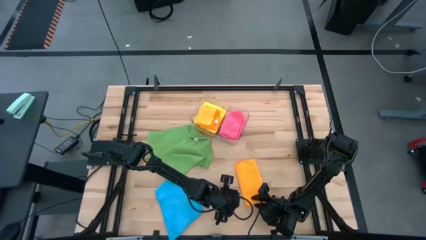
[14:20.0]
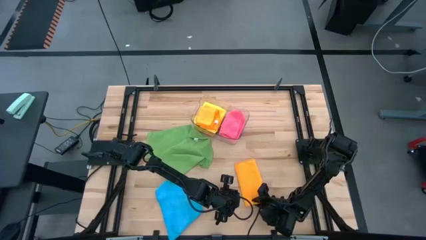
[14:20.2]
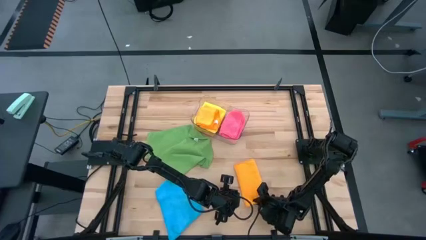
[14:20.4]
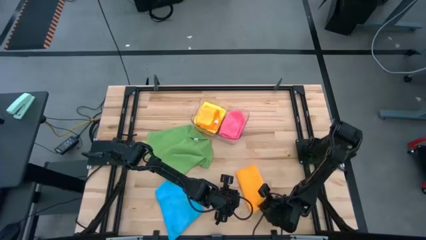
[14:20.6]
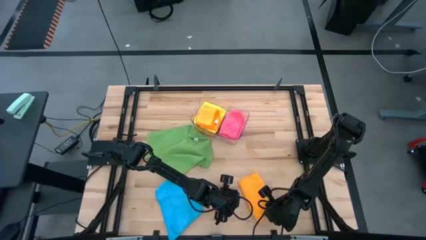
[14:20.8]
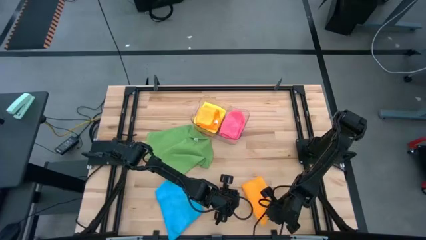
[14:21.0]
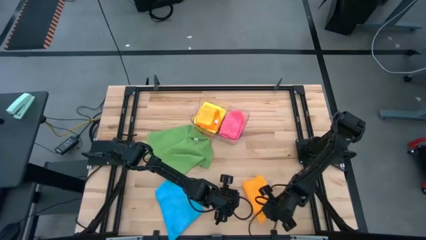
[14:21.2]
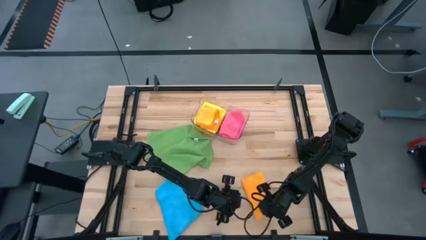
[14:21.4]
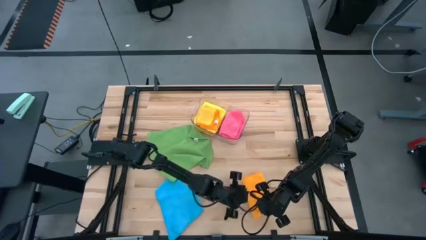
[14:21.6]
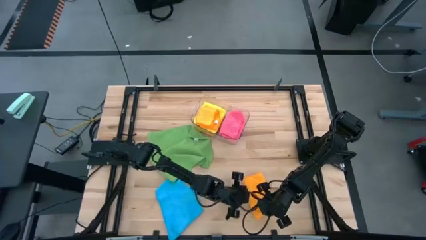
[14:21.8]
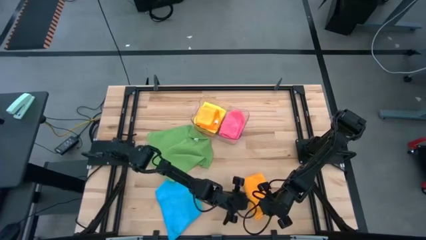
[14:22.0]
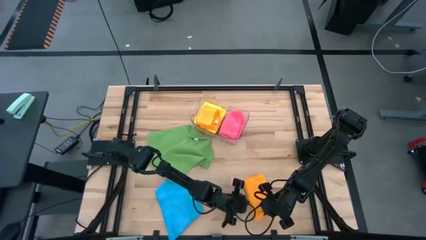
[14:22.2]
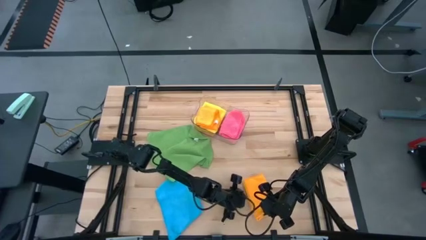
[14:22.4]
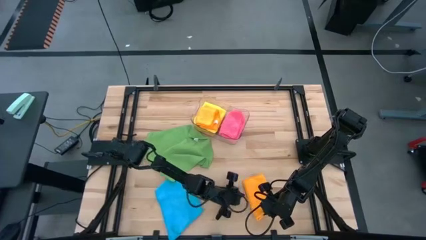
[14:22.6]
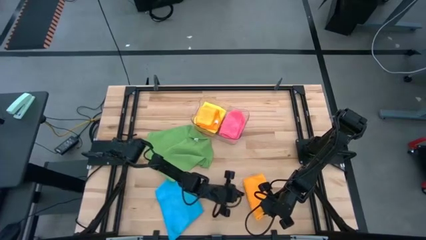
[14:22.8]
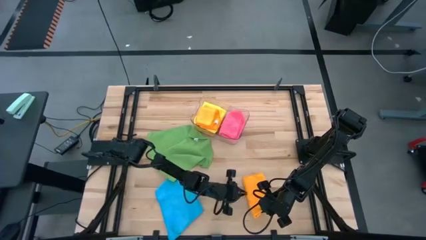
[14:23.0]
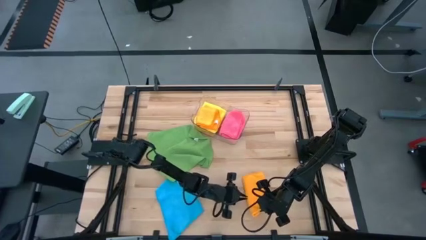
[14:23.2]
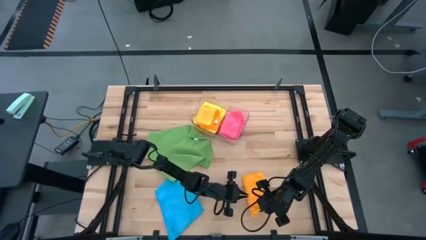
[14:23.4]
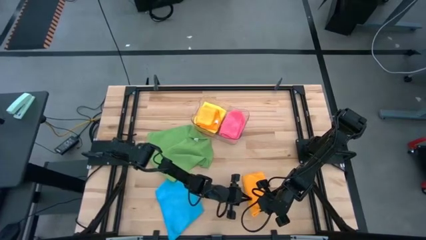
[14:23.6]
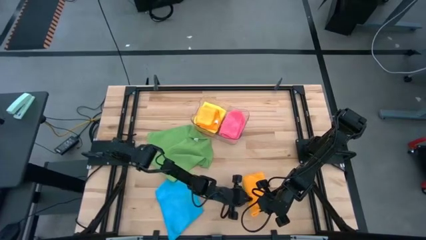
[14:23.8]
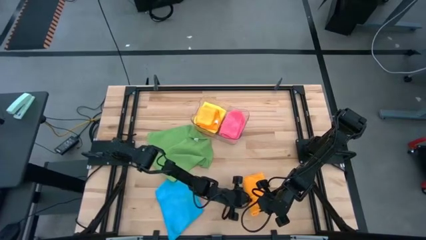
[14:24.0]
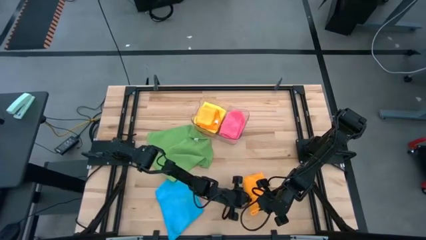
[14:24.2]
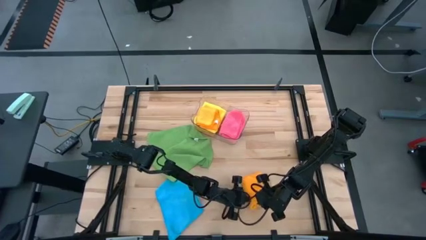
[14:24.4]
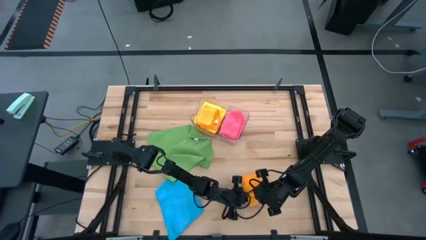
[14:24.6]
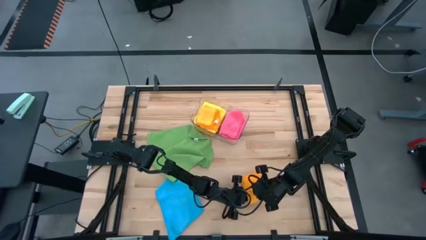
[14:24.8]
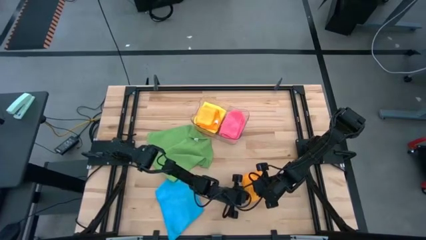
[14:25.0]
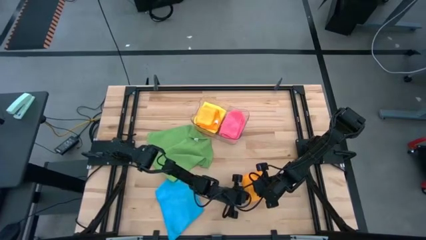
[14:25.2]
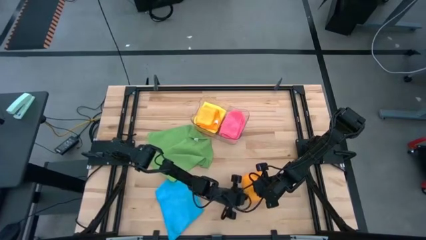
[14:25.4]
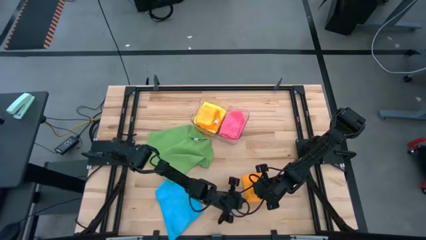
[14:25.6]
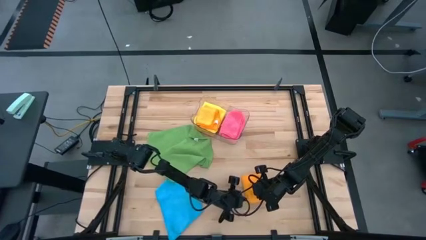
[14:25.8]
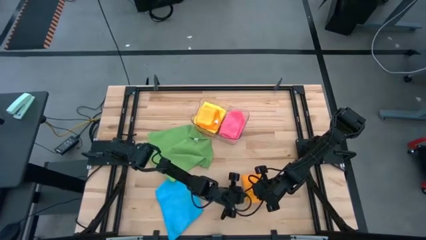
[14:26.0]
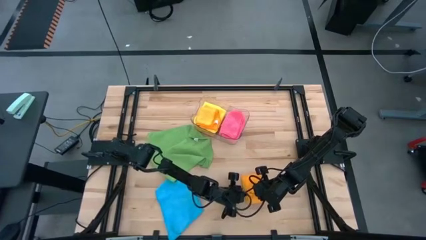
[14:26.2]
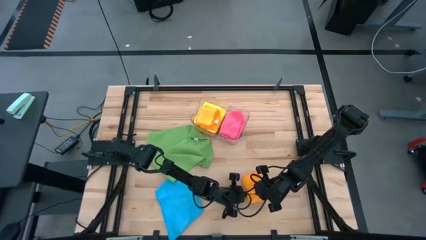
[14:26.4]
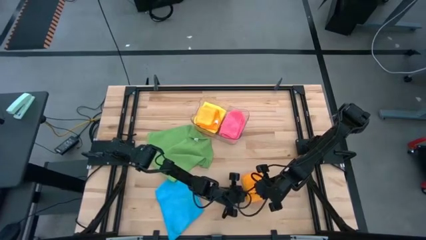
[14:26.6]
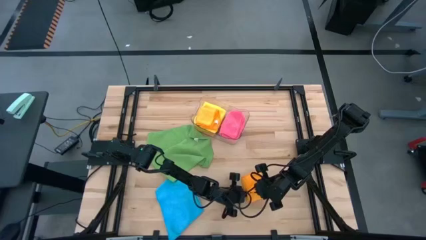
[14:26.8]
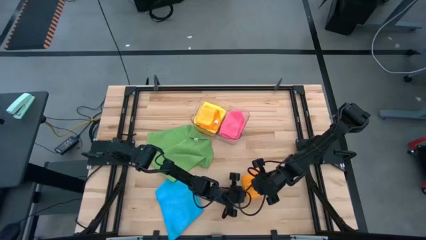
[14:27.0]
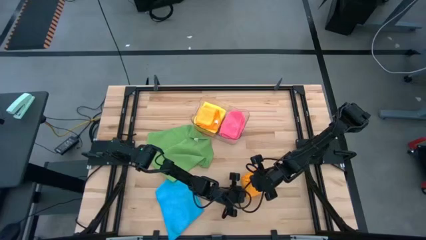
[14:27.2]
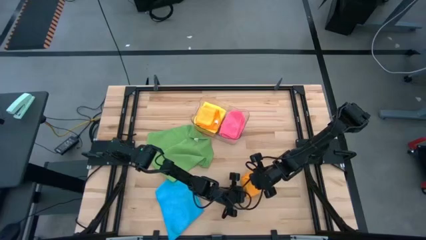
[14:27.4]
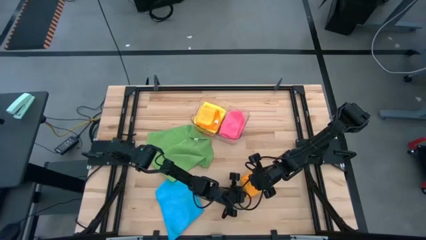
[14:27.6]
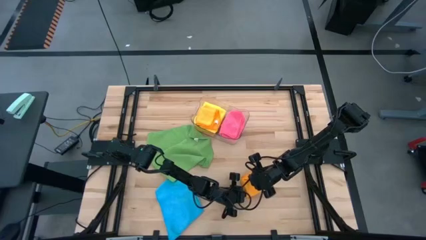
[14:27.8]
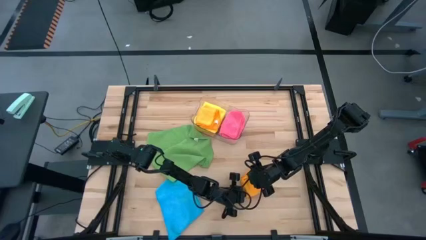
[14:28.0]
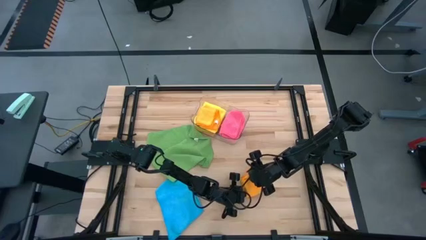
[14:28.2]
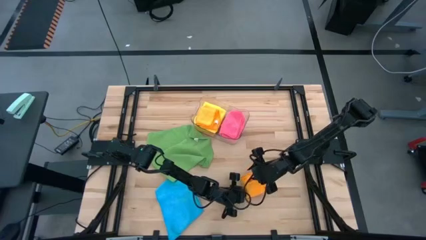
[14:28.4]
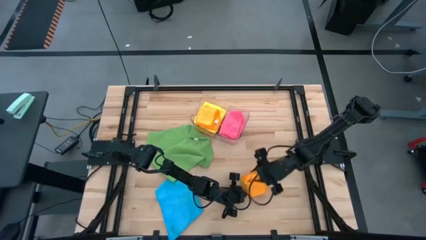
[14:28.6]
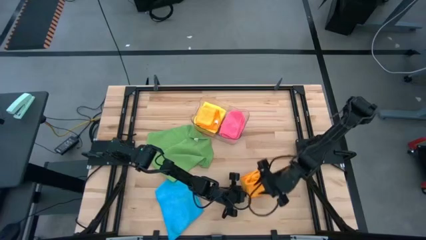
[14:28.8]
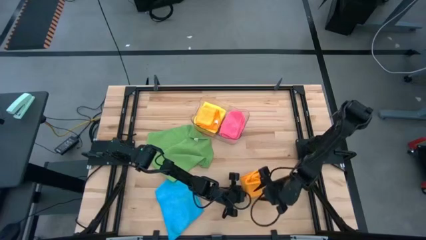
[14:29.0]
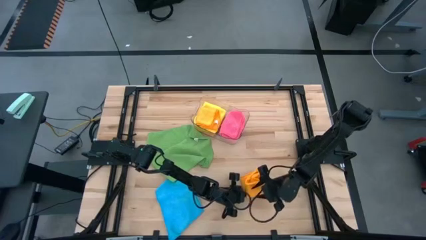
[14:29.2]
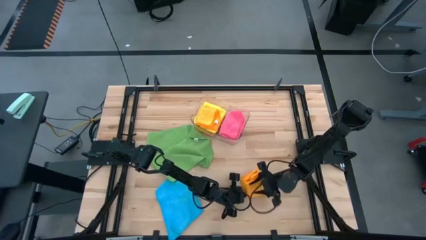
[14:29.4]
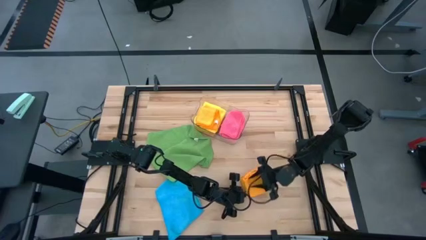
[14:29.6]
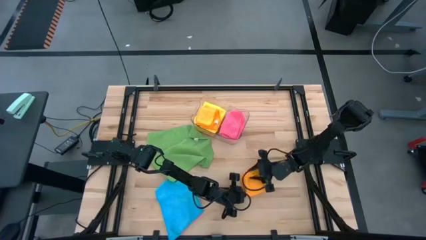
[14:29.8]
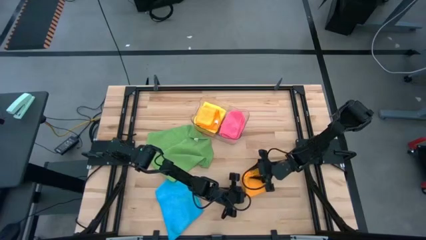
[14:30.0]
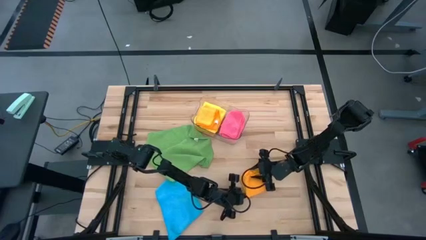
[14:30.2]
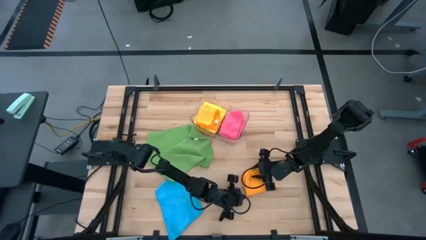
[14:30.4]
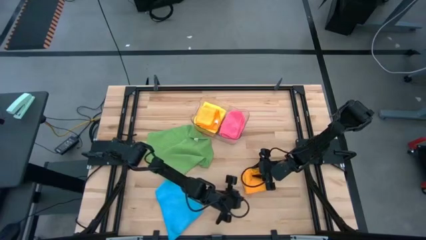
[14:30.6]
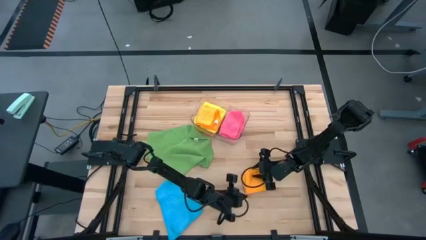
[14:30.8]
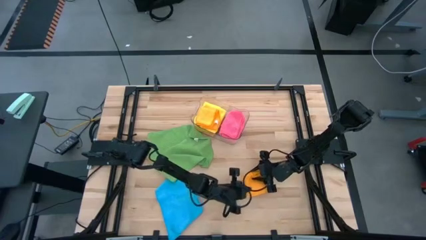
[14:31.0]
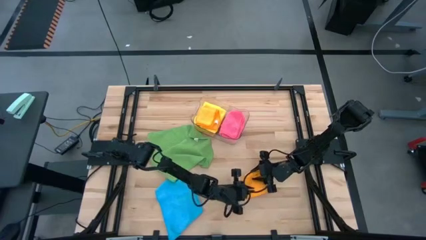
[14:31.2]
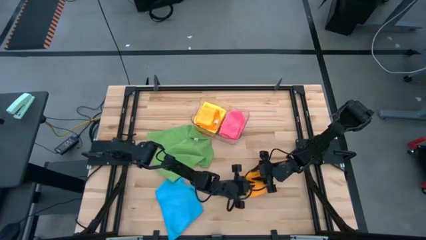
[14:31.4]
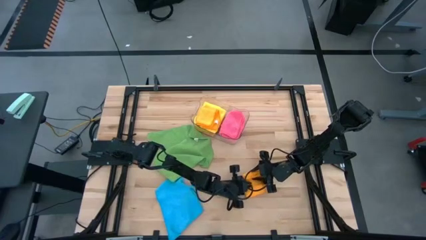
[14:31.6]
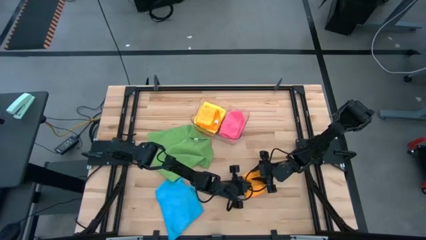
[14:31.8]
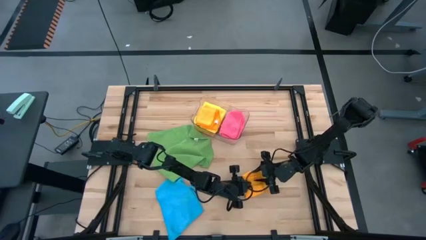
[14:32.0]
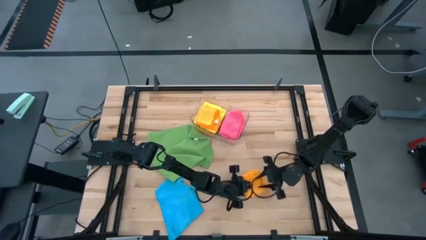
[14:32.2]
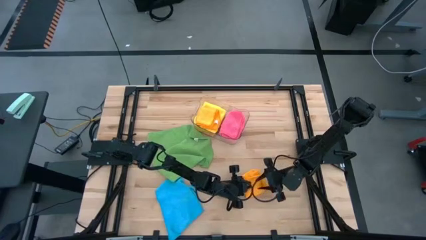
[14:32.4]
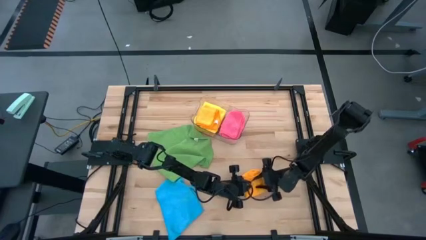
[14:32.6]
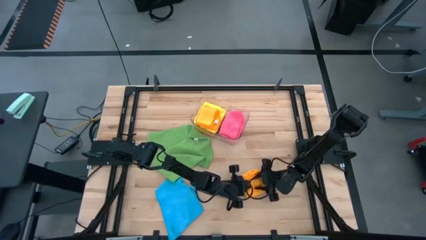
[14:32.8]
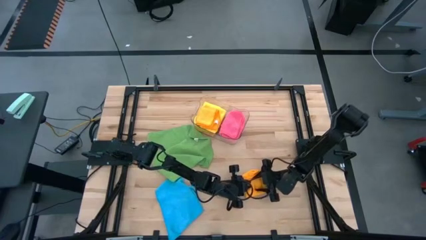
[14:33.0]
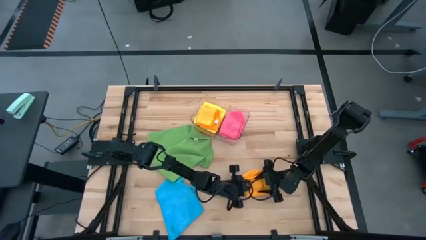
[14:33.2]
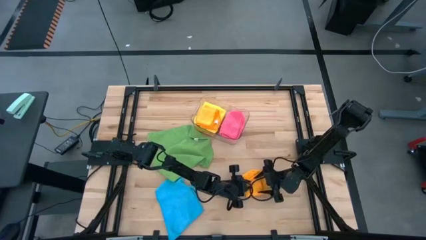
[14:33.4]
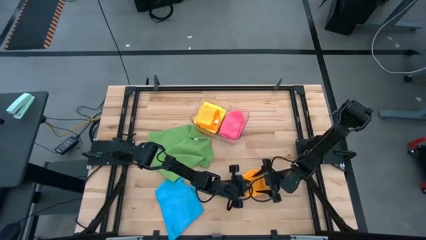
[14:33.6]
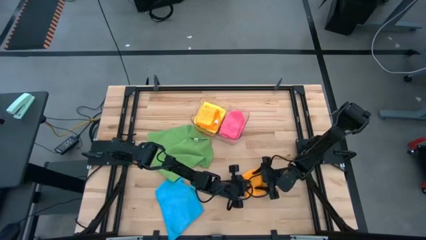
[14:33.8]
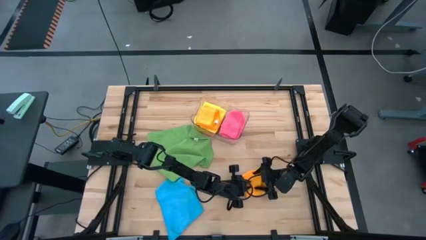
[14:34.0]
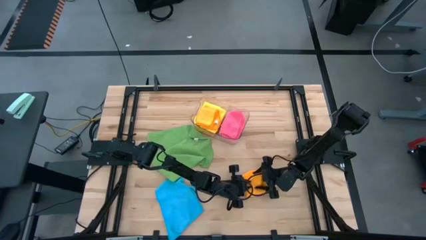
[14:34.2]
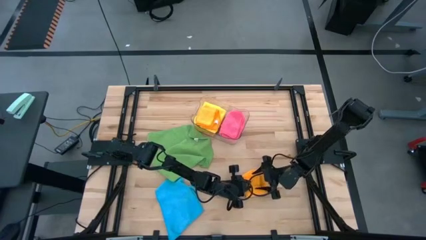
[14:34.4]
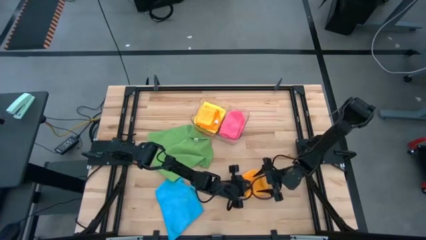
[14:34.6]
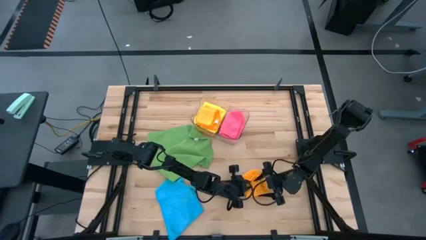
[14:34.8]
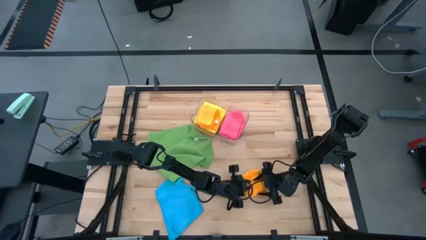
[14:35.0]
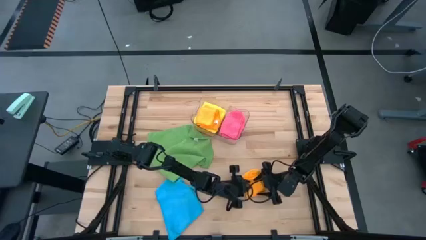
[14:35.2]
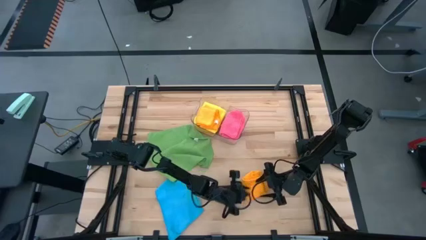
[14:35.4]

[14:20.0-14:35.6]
Task: Fold microfiber towels
Fold the orange microfiber cloth
